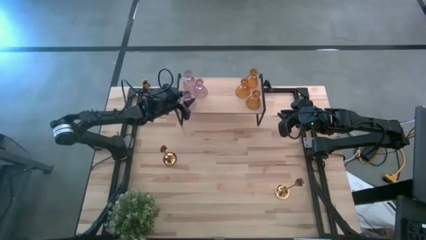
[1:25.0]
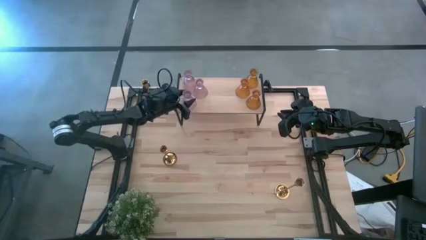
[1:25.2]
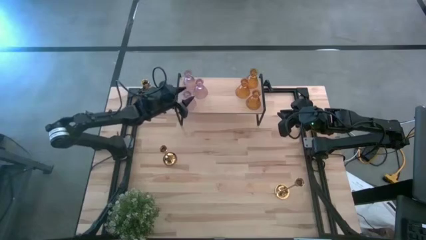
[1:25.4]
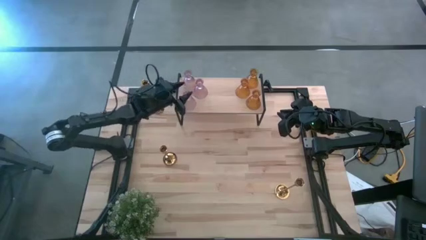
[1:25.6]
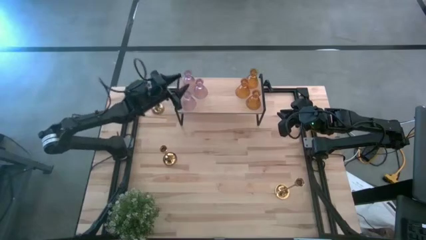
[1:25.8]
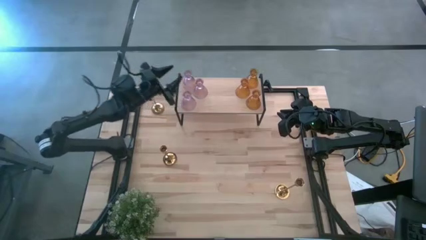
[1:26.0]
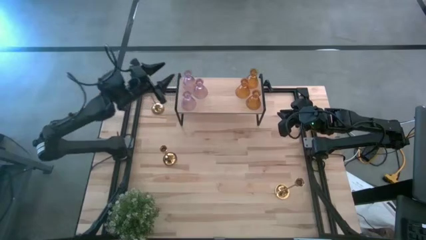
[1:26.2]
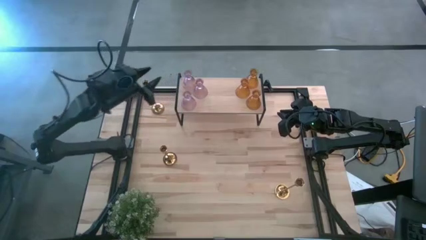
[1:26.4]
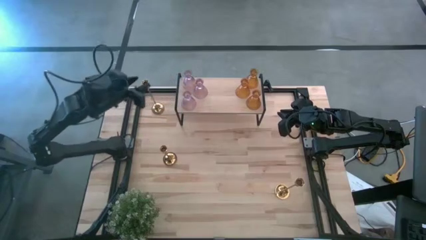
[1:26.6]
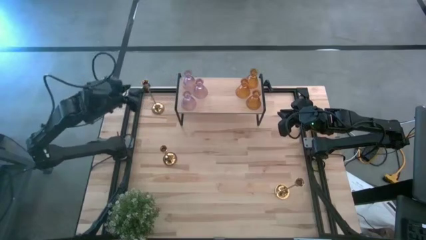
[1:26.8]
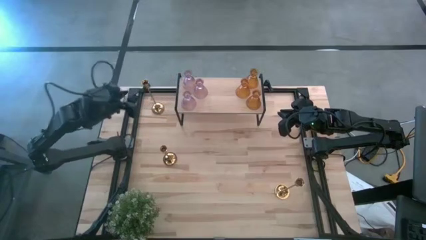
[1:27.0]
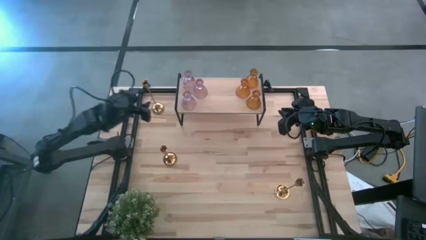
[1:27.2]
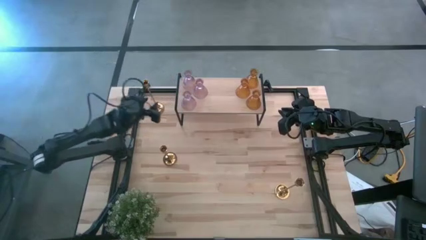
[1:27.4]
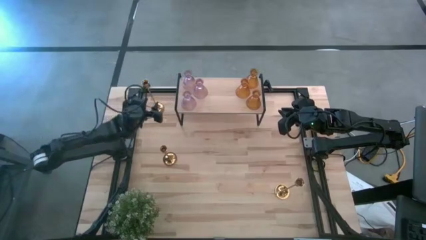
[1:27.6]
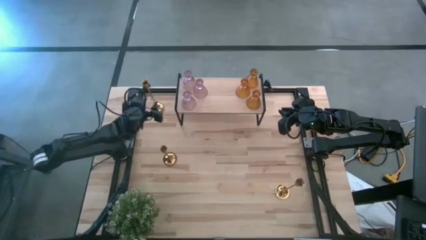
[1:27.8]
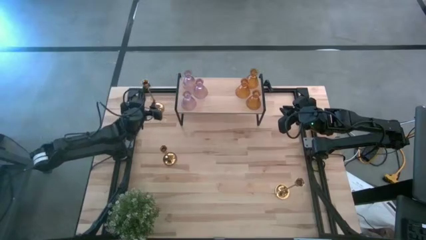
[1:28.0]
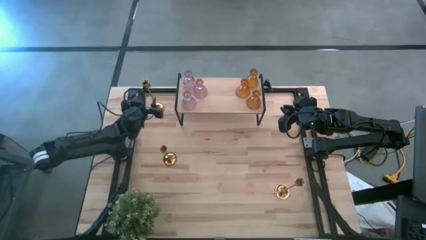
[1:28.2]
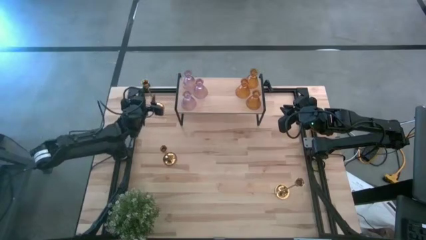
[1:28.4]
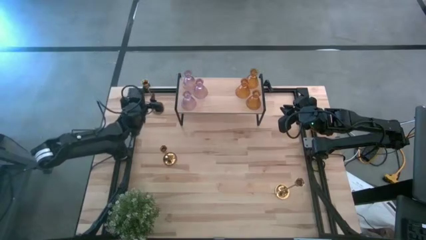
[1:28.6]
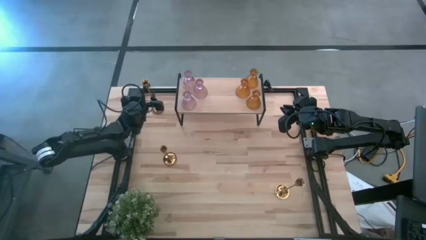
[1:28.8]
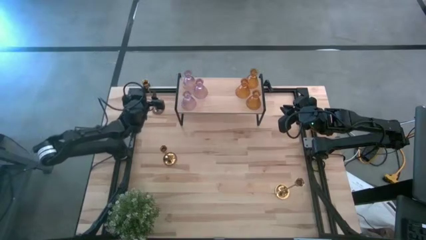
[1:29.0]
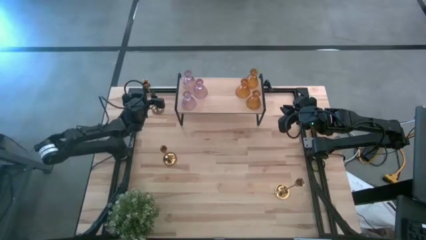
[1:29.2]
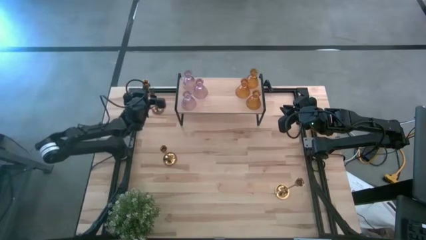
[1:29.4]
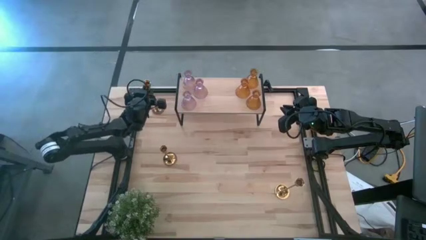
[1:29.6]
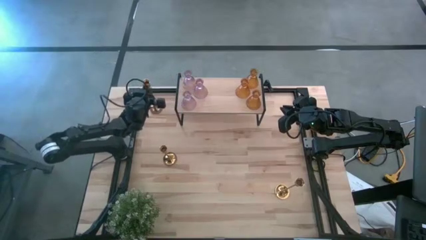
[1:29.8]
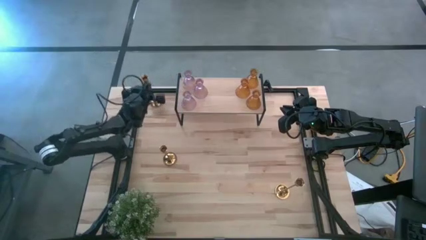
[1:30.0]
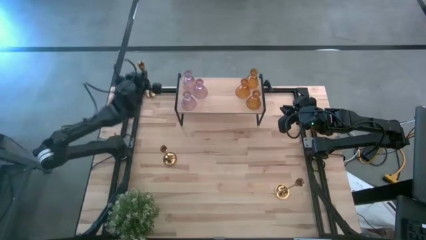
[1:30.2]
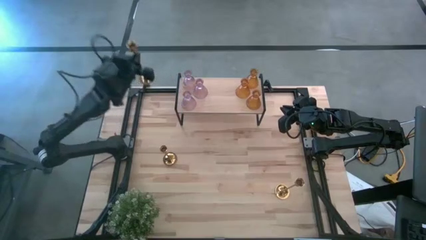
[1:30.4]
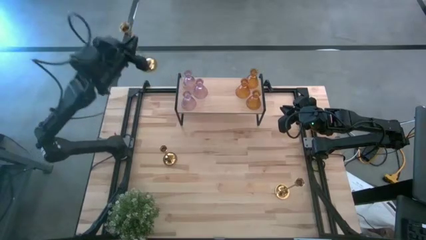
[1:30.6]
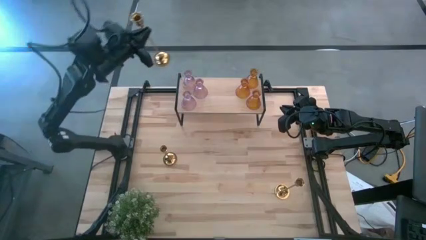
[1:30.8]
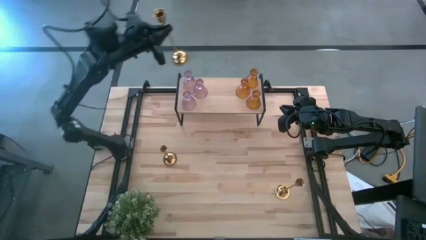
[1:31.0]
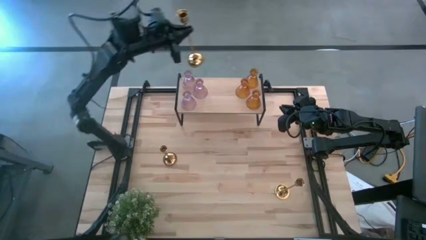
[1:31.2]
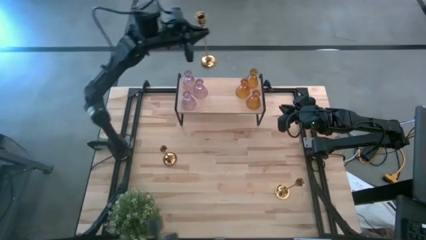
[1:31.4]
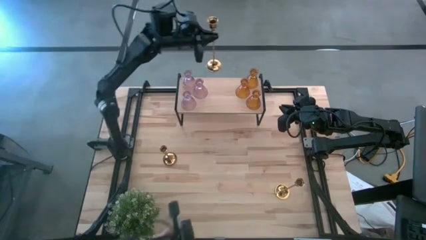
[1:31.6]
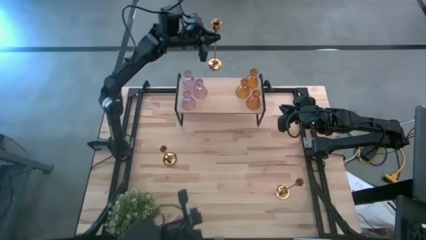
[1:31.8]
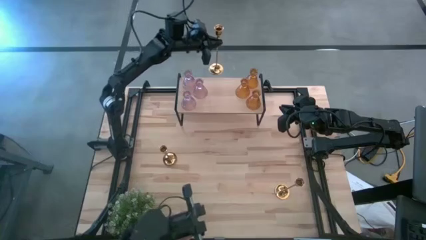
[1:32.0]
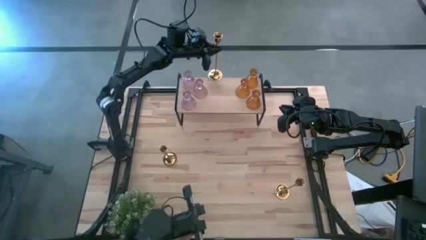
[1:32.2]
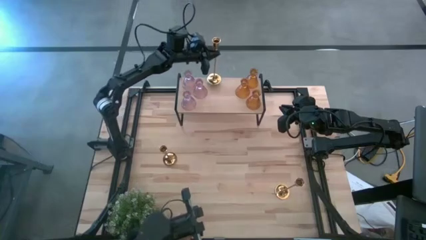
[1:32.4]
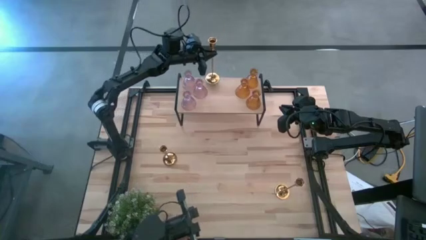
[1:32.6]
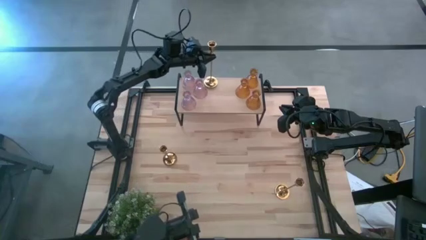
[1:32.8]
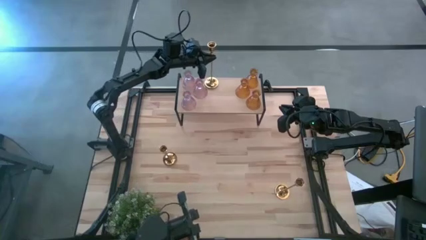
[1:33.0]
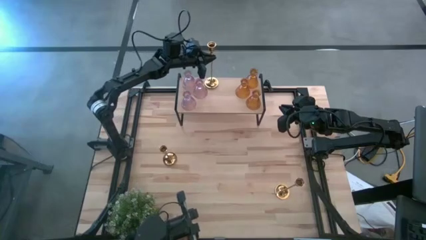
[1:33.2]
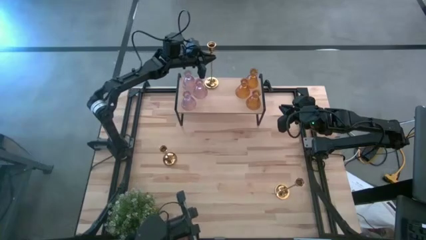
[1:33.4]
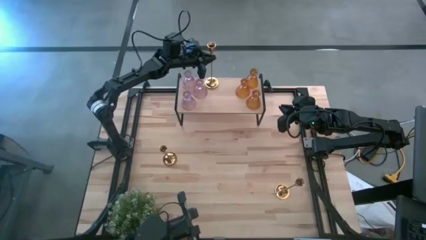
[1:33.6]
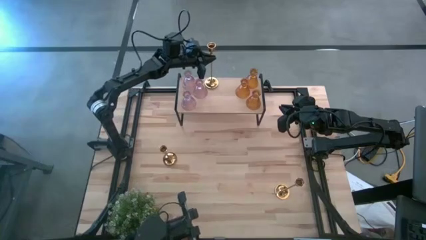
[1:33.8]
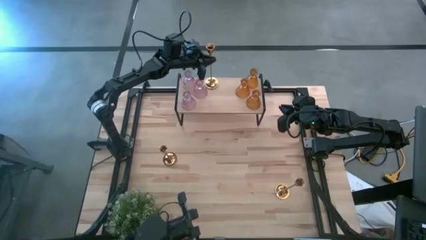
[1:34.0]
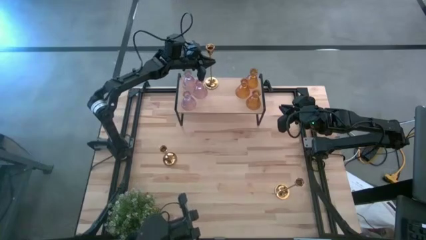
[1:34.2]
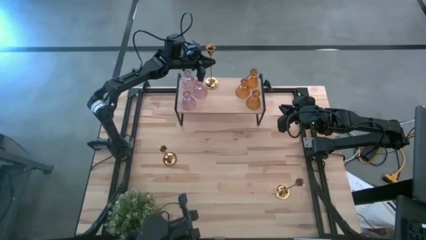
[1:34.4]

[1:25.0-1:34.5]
Task: Pick & Place candle stick holders
Put the top golden metal candle holder on the shelf

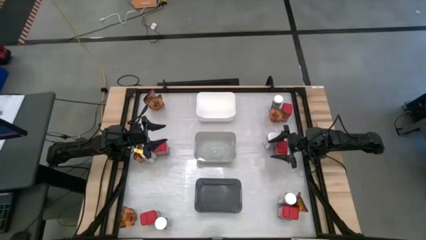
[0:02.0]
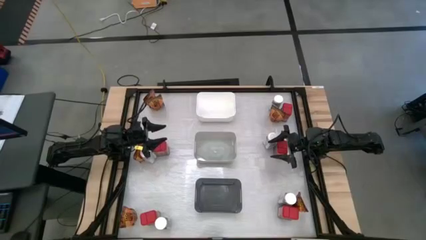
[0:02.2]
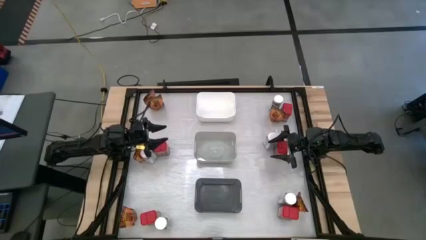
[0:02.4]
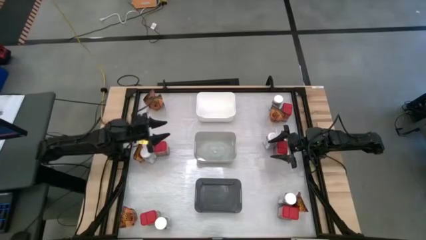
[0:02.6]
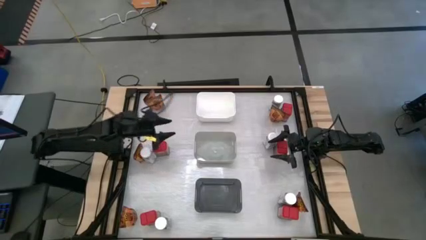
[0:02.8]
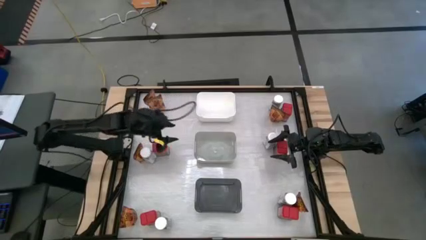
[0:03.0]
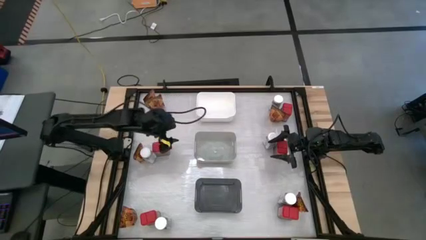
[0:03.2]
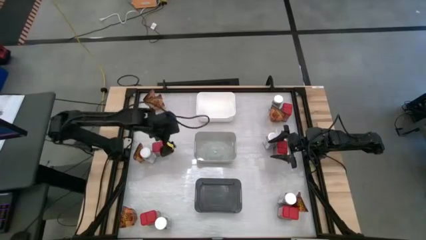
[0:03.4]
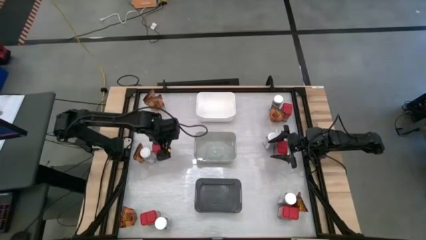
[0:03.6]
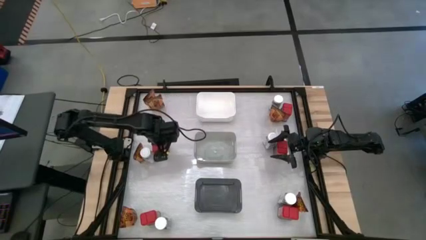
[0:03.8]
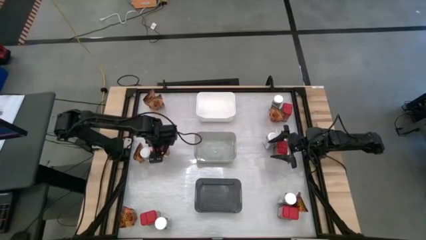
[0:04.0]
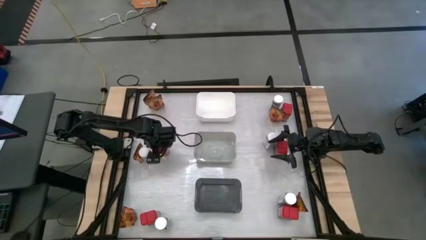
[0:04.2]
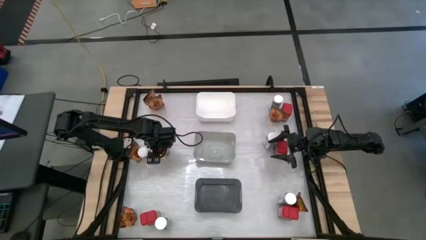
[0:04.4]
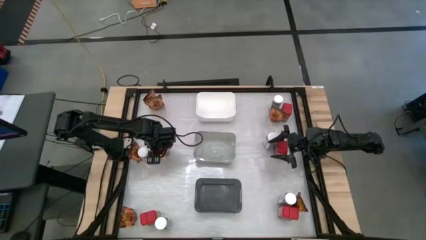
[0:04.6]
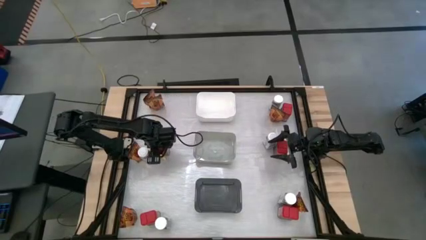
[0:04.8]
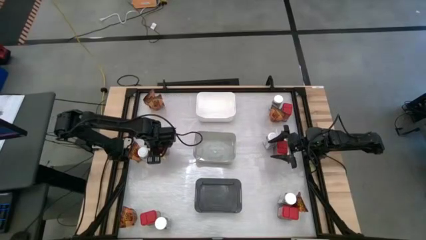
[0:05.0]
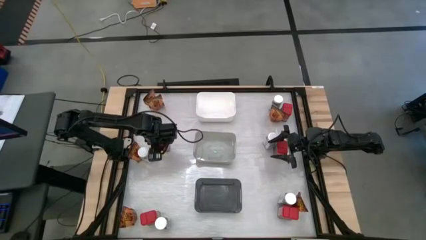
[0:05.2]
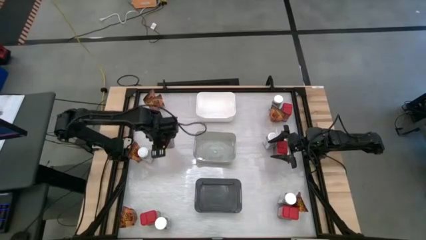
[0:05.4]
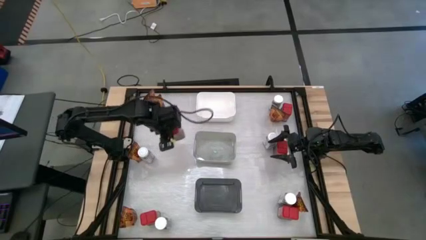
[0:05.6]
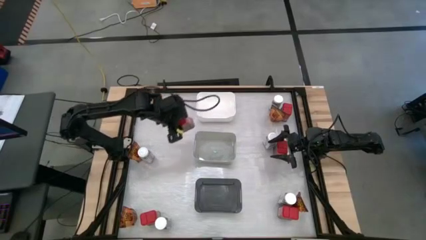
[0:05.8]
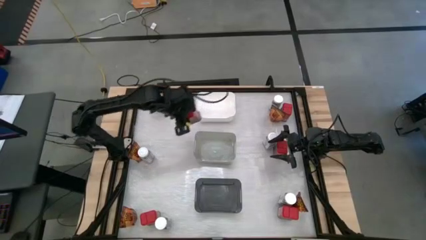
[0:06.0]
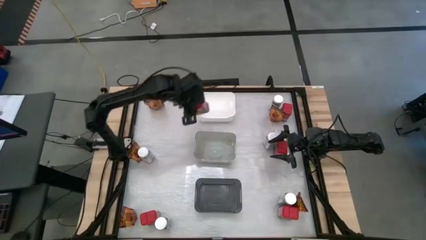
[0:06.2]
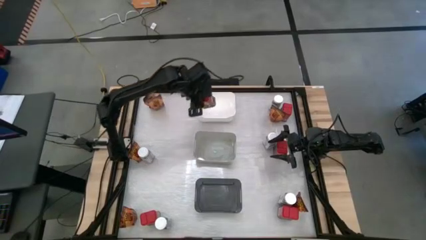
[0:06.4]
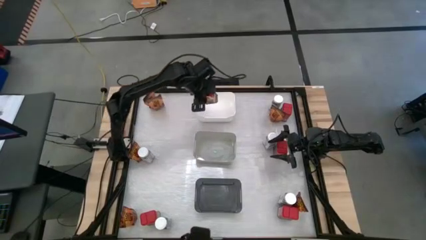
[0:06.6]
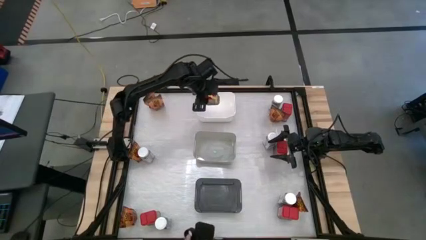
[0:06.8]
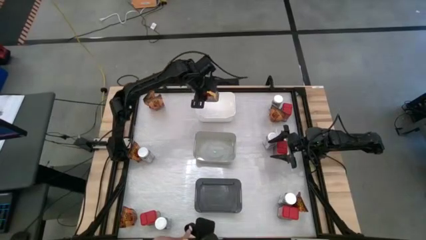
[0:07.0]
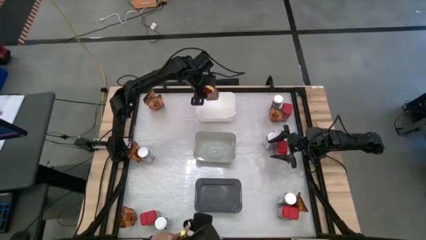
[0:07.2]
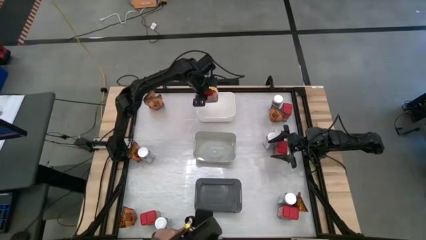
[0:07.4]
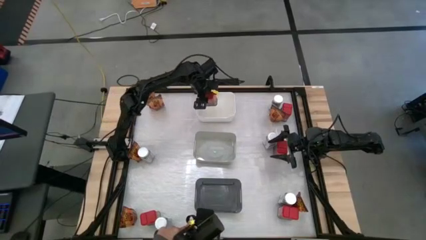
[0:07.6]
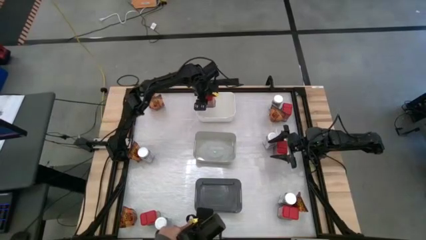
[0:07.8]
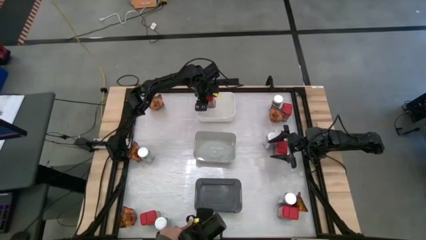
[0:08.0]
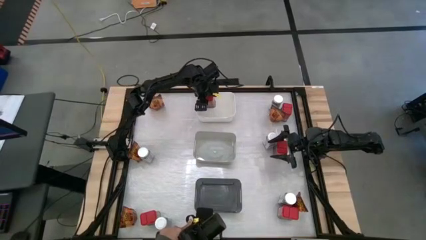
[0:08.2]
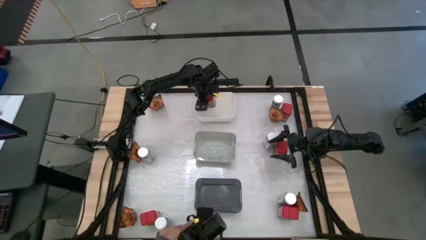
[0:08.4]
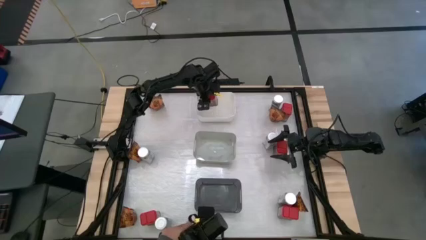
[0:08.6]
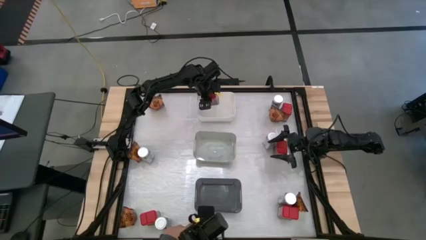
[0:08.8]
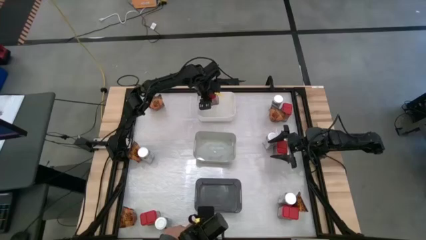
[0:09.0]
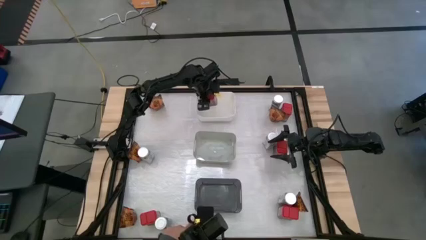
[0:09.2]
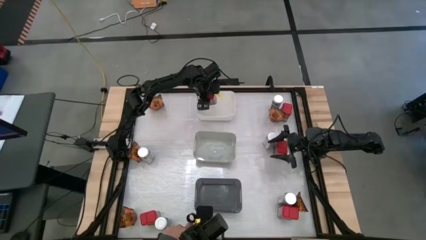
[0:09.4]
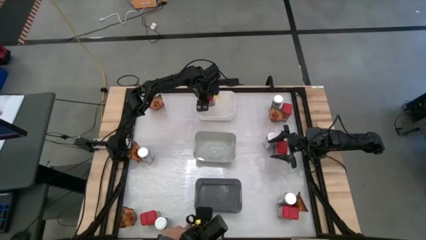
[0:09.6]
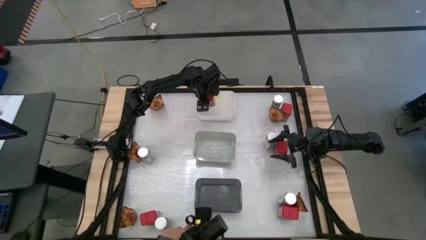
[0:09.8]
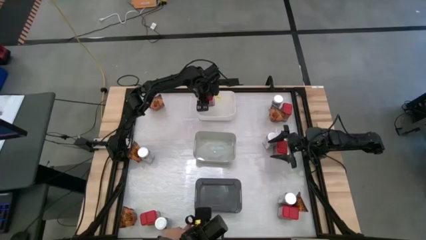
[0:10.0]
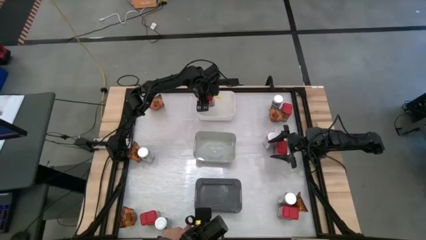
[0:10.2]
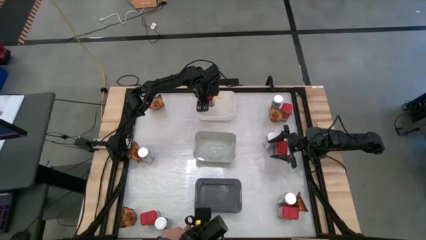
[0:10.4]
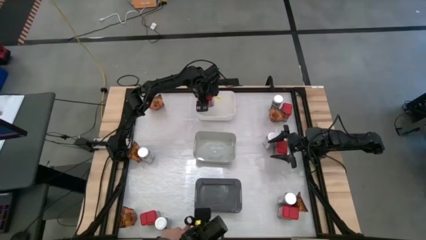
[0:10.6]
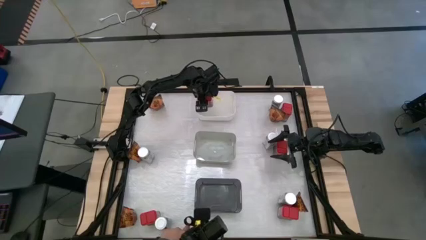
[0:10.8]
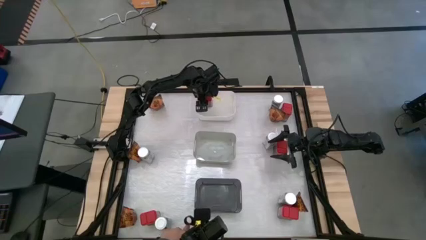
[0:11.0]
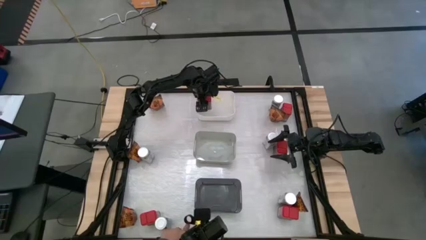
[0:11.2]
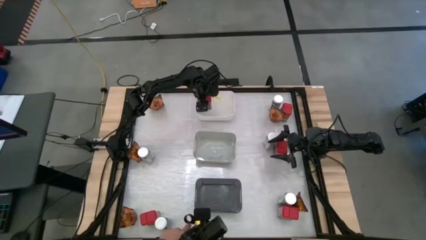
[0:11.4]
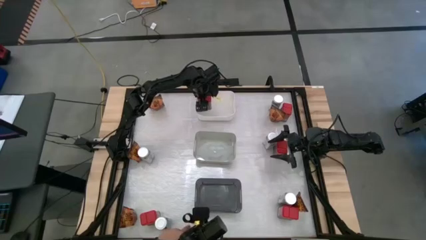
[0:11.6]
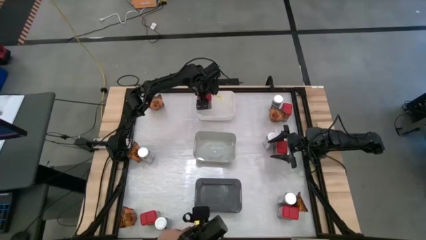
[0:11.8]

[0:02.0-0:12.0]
Task: Sort spices by type
Put the red seasoning can into the white bin
